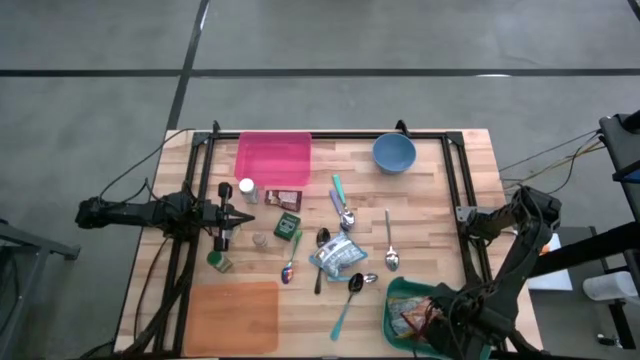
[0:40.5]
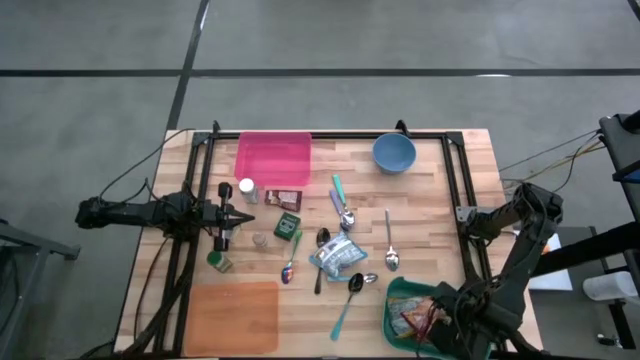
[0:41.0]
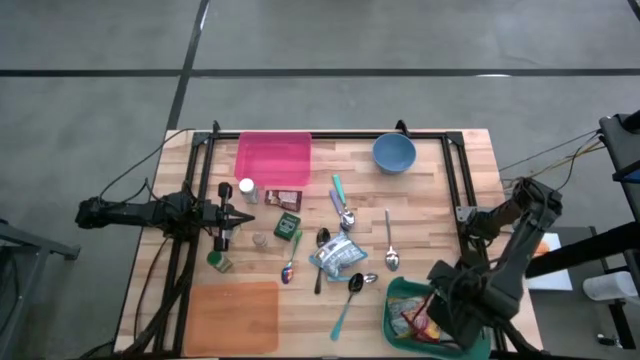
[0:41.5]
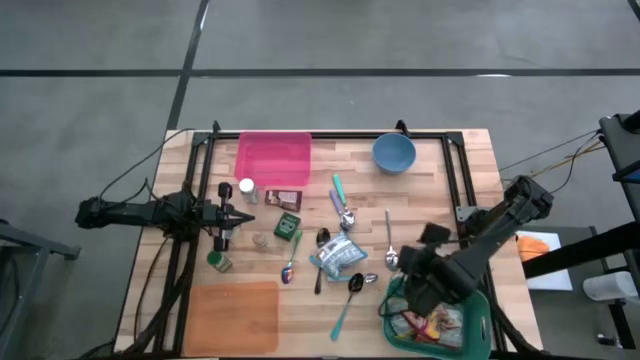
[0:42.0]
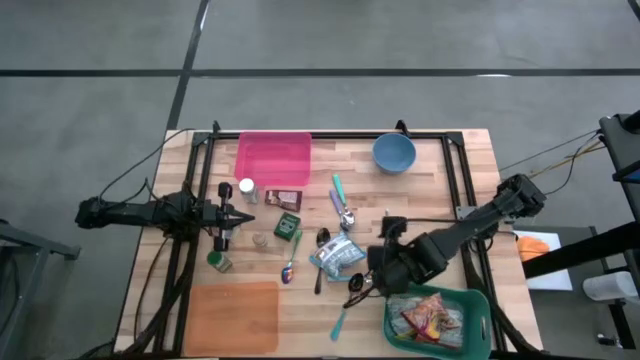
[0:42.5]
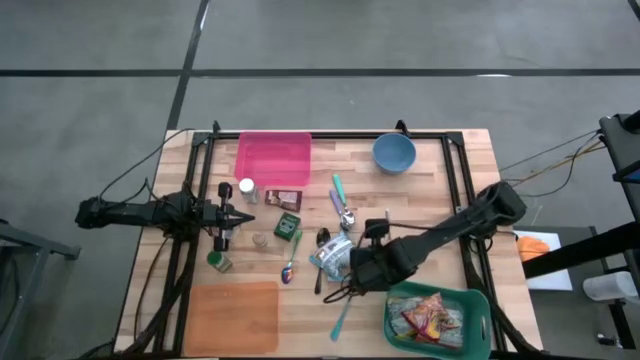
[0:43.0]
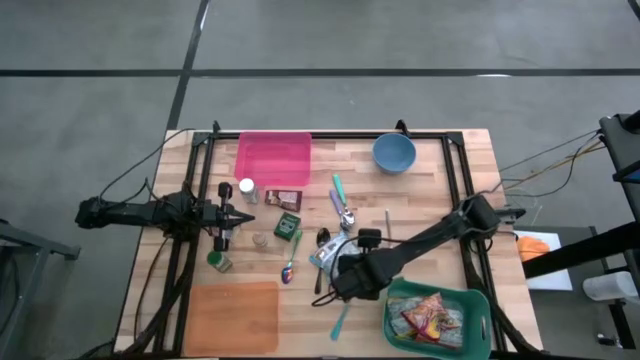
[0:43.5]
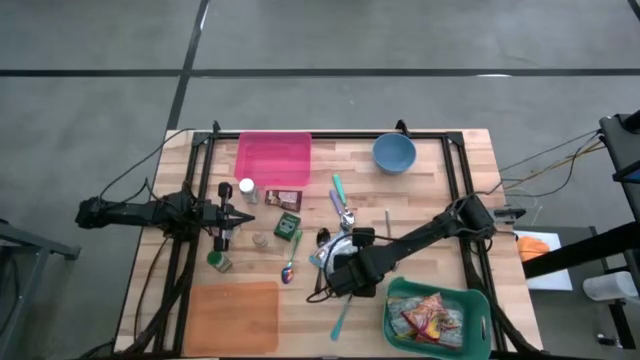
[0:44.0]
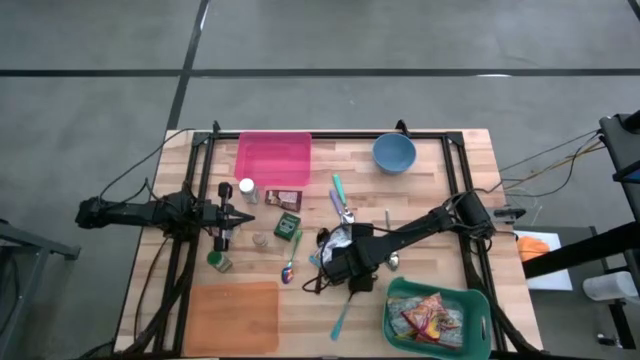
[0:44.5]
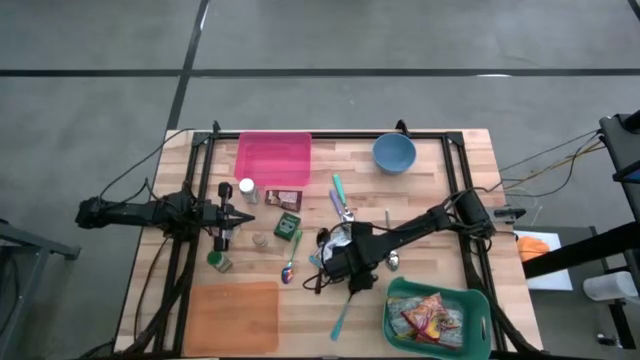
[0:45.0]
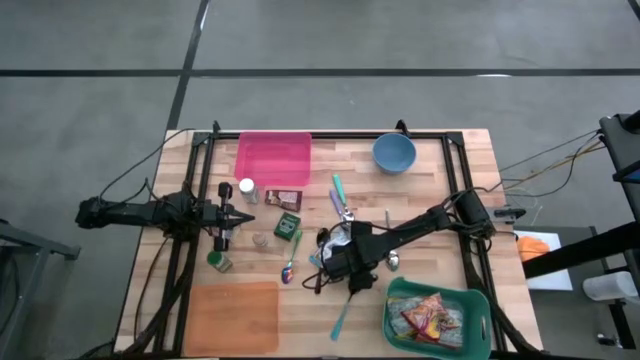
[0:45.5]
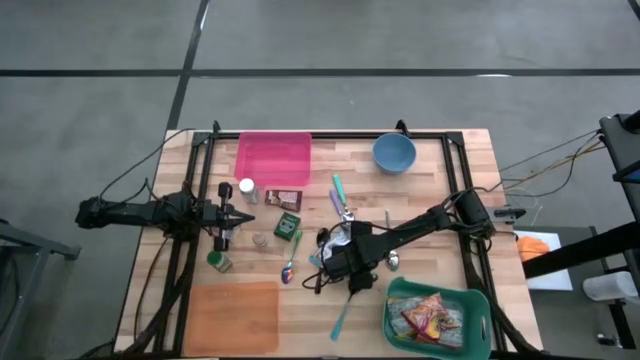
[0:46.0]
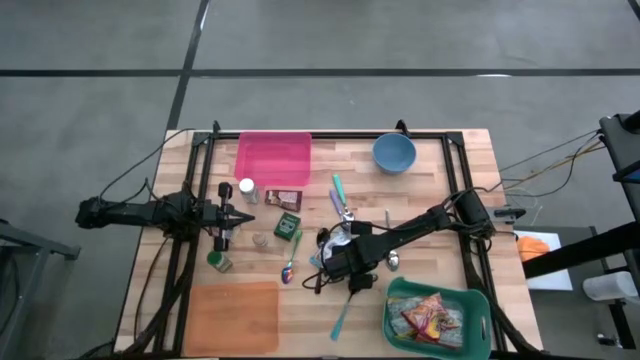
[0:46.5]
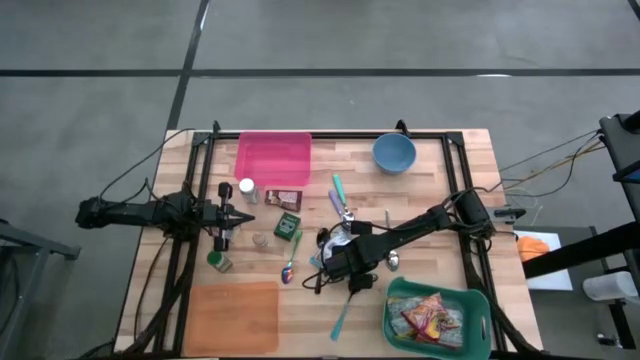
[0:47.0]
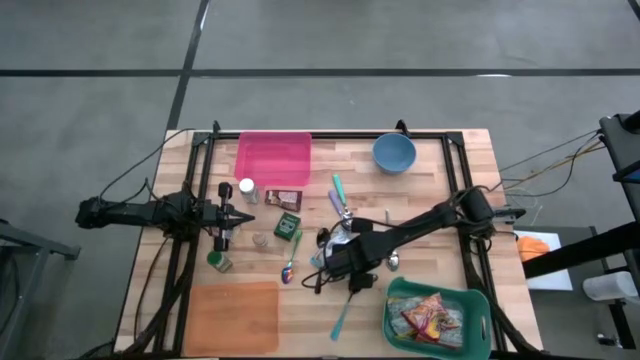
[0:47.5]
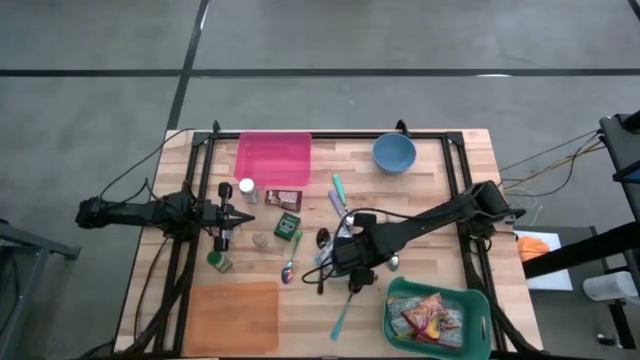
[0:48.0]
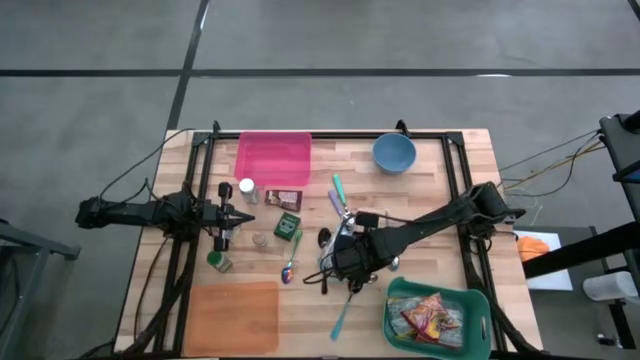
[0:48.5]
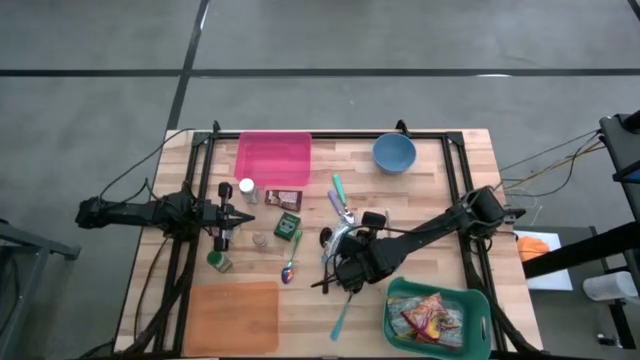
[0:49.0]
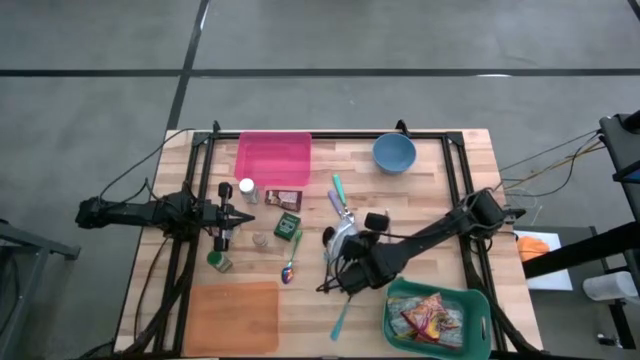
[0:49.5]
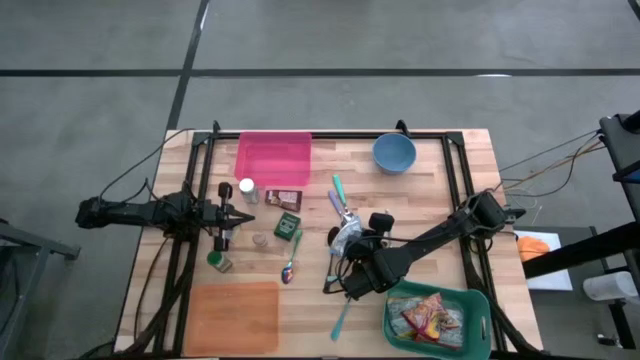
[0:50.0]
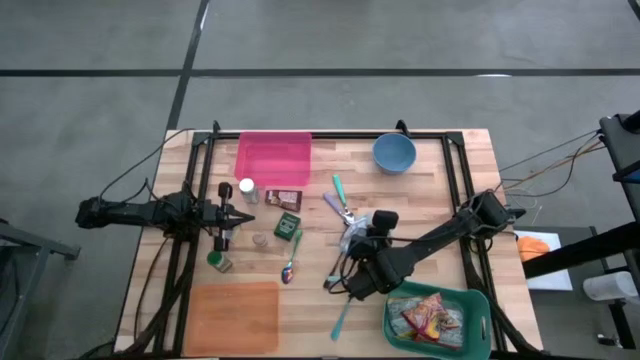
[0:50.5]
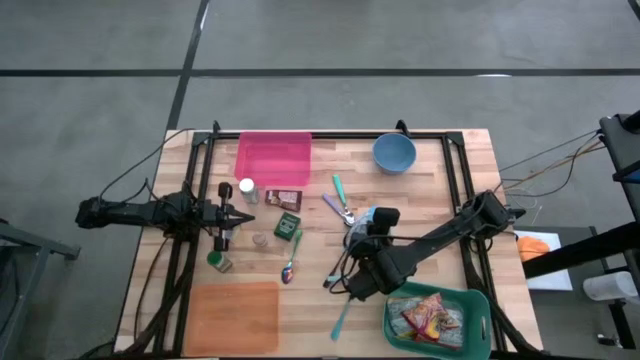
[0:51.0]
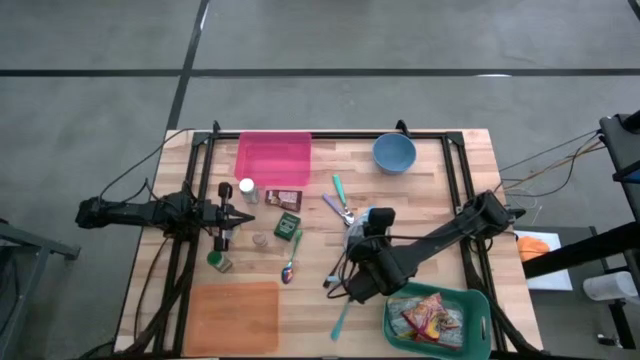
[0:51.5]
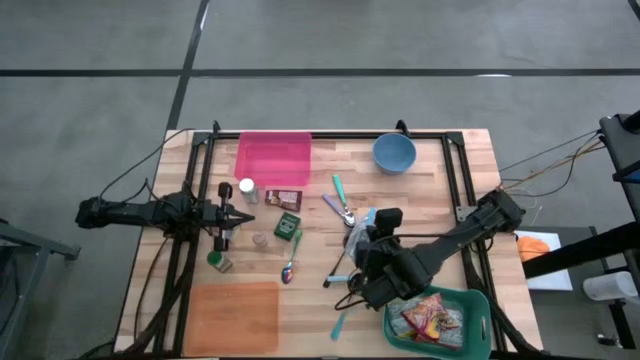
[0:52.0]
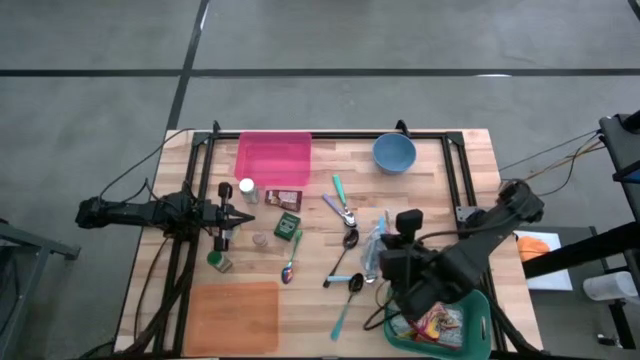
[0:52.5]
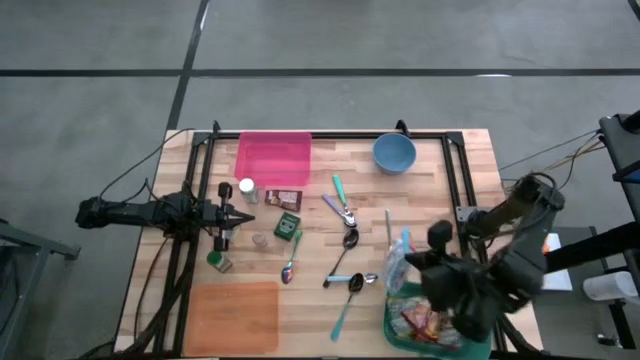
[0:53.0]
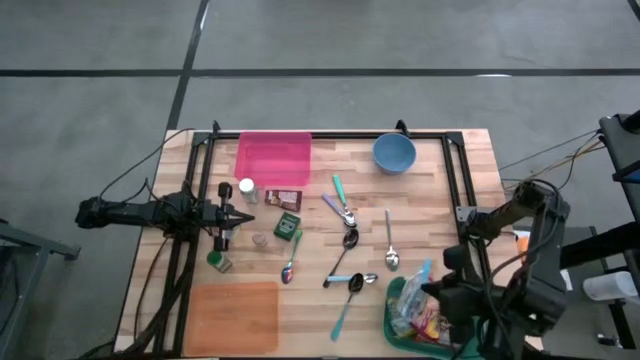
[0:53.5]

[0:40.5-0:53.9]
Put the blue noodle pack into the green bin

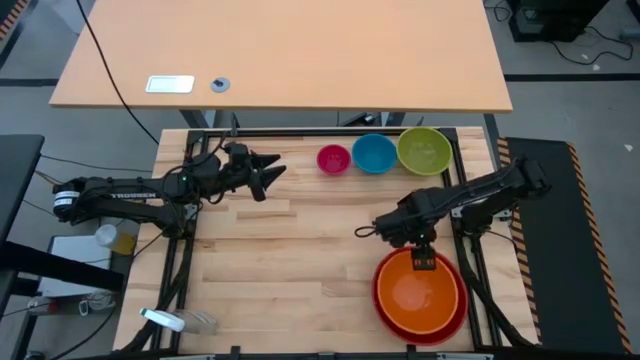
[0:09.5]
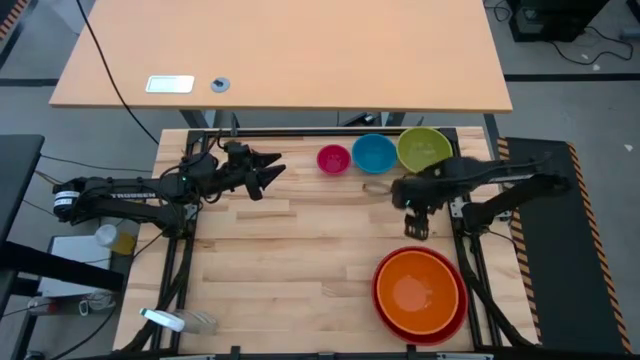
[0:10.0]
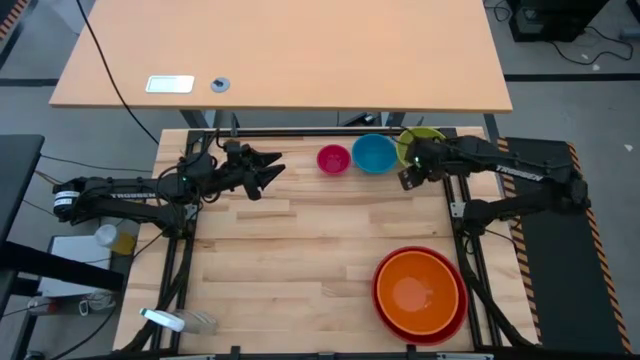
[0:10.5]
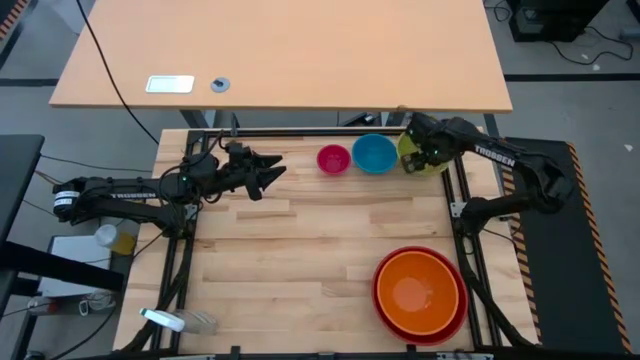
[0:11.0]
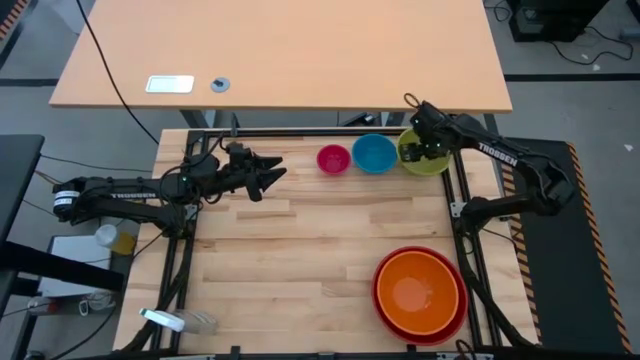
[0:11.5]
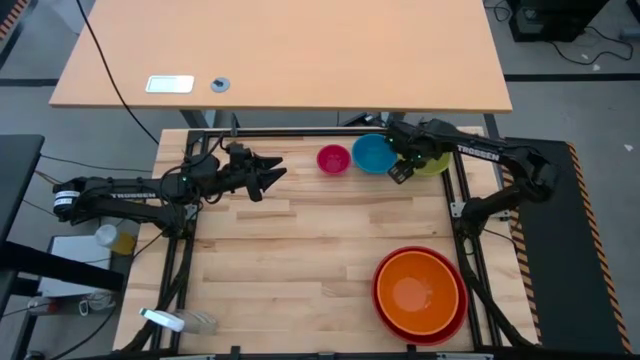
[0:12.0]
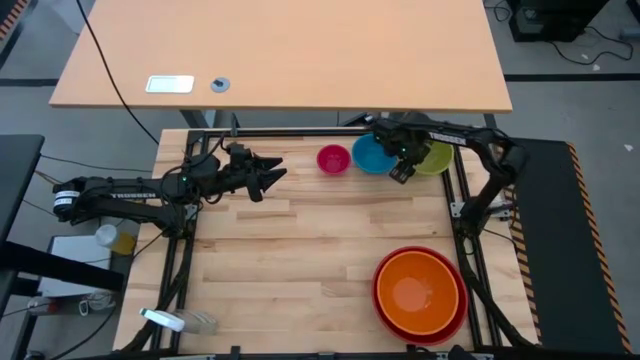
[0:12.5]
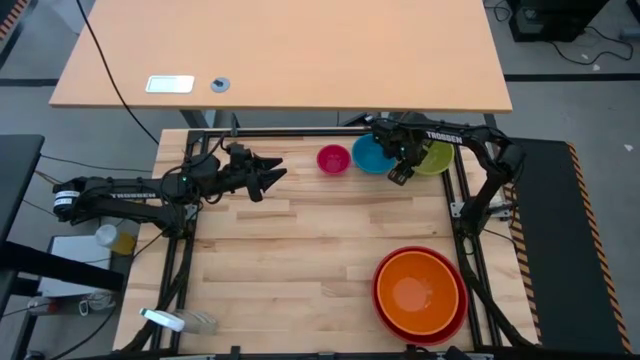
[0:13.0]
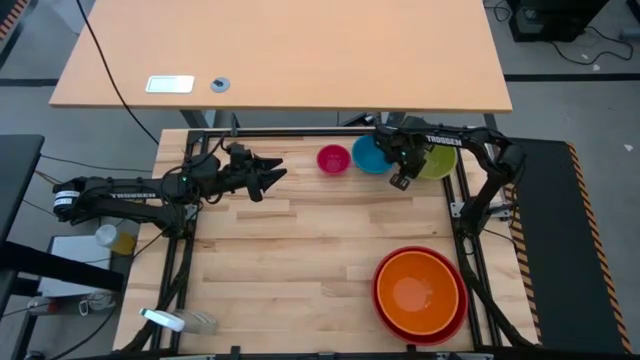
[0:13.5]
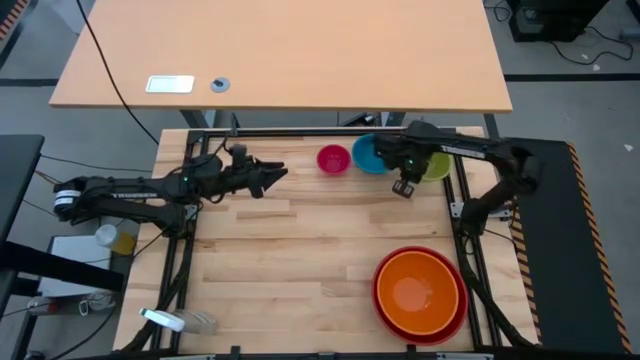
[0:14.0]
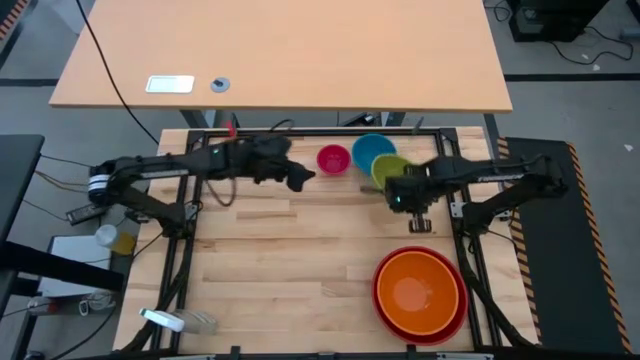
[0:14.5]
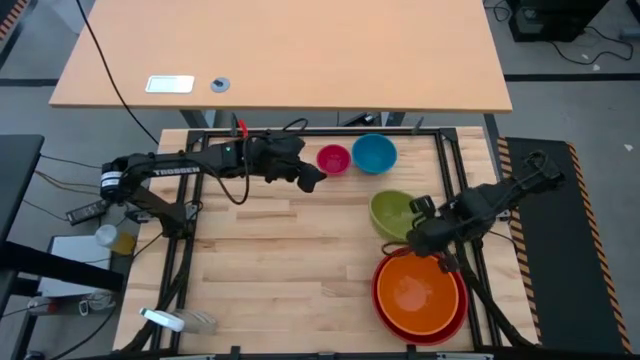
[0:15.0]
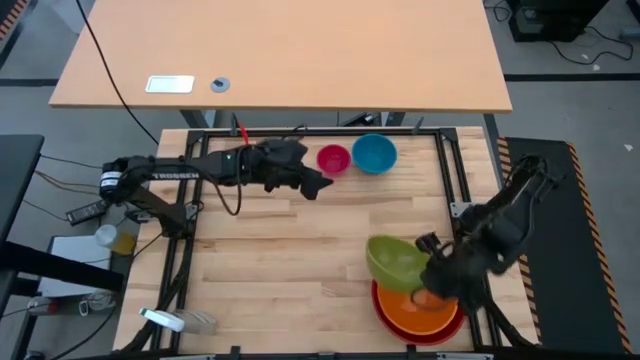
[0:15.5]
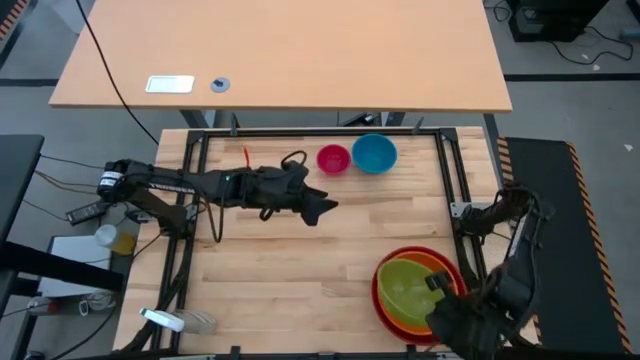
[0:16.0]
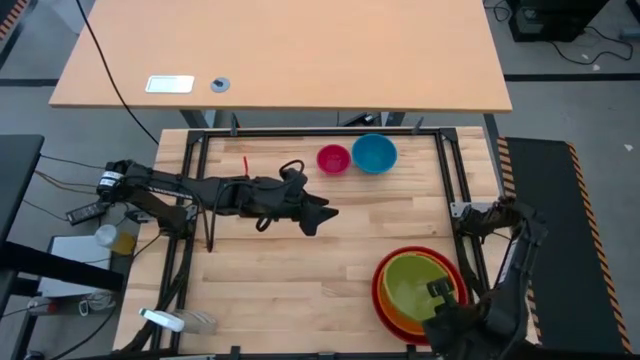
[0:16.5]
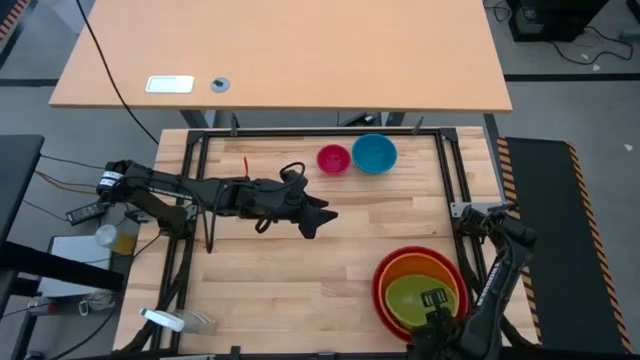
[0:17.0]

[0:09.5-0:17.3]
Stack the green bowl on top of the orange bowl
